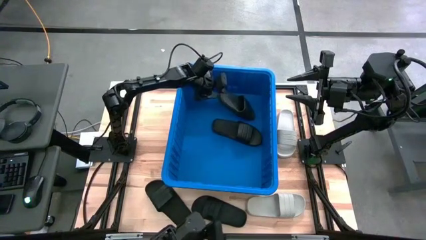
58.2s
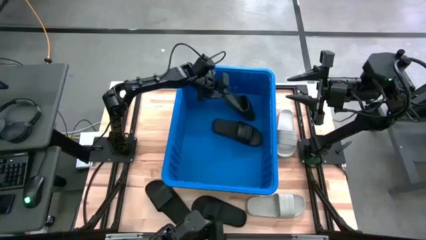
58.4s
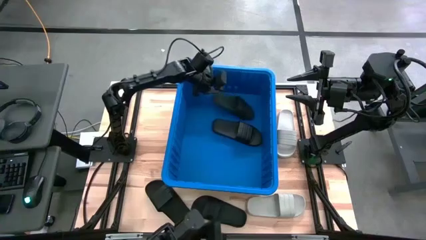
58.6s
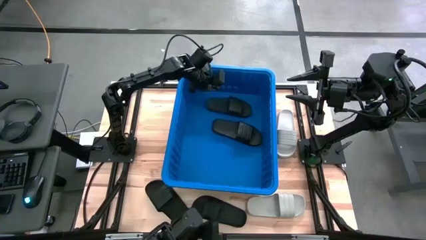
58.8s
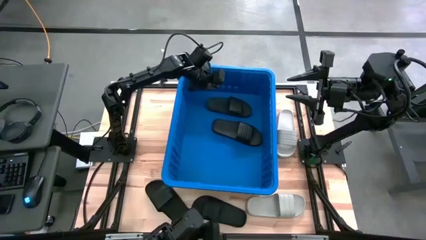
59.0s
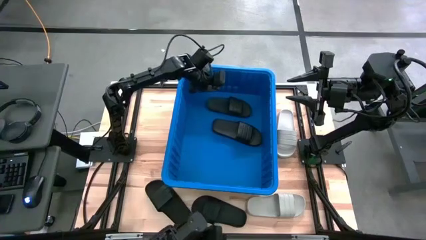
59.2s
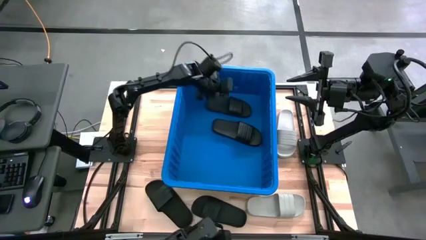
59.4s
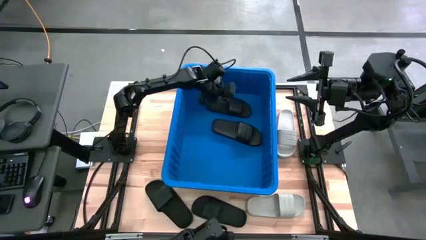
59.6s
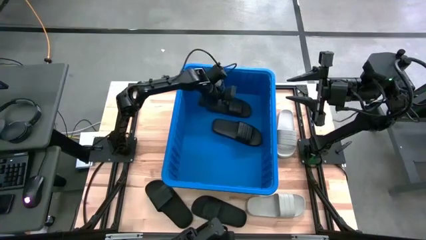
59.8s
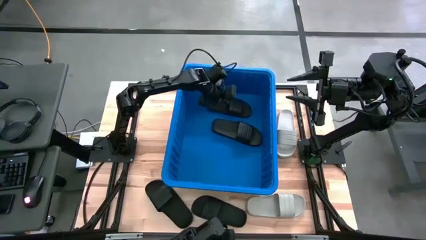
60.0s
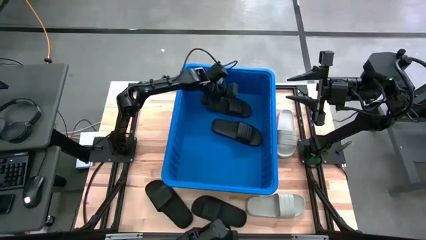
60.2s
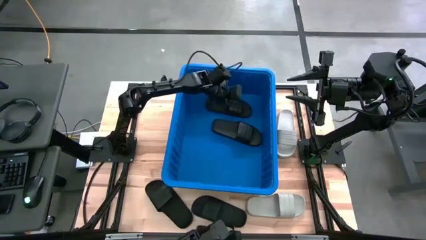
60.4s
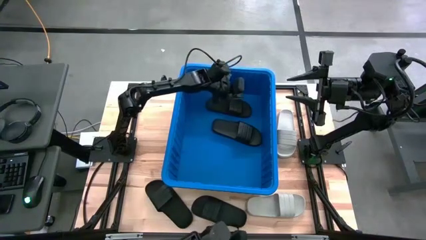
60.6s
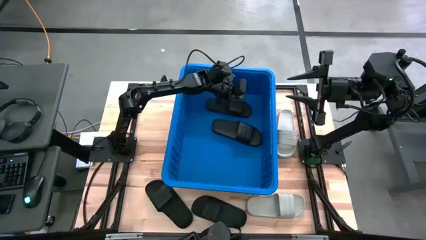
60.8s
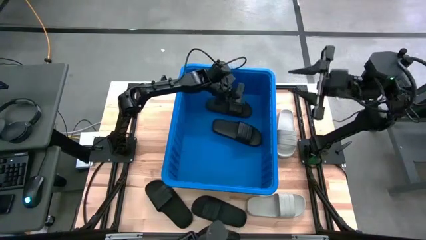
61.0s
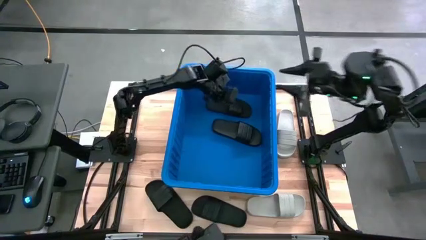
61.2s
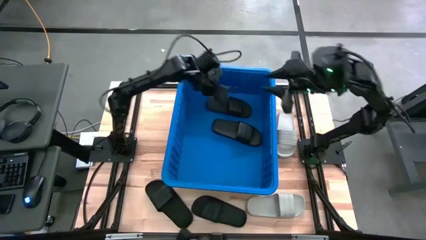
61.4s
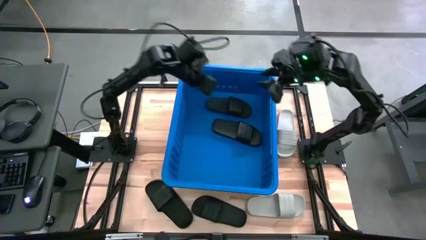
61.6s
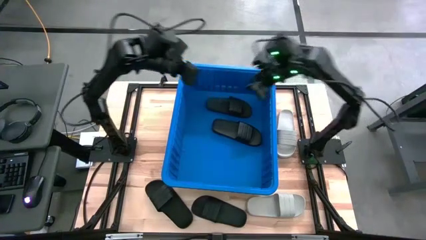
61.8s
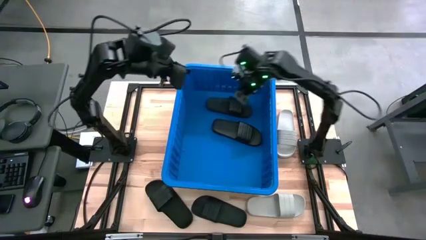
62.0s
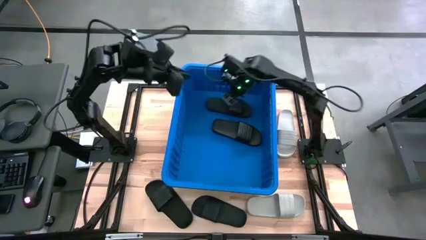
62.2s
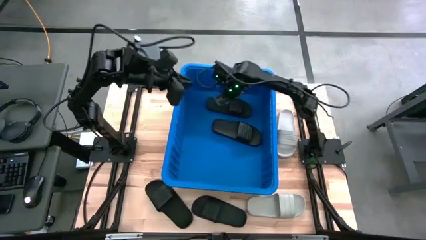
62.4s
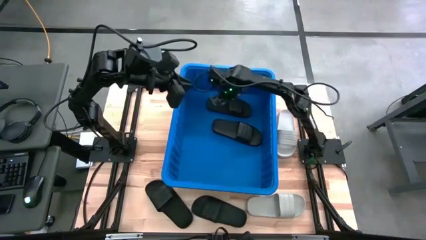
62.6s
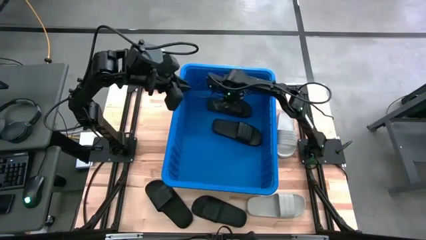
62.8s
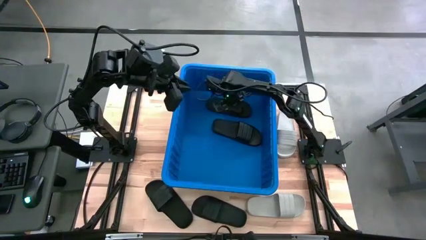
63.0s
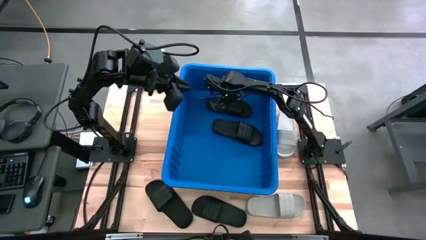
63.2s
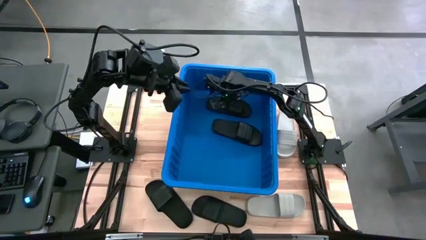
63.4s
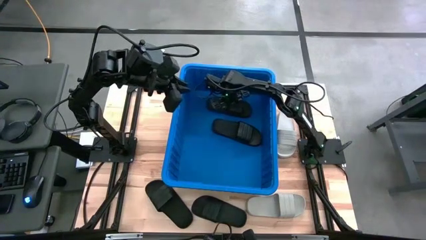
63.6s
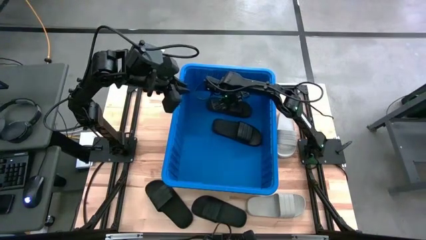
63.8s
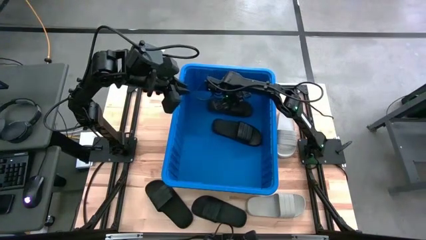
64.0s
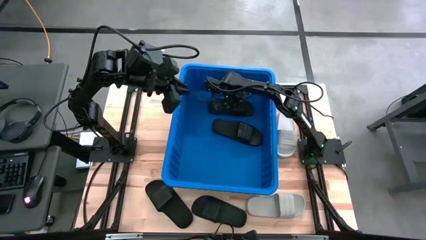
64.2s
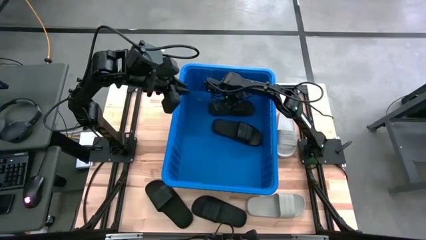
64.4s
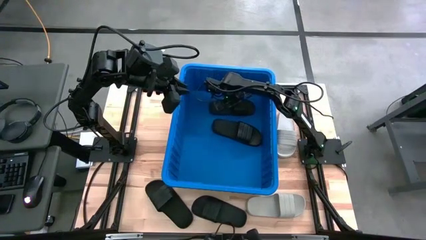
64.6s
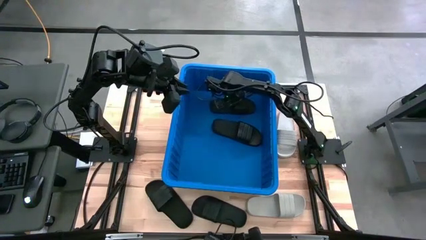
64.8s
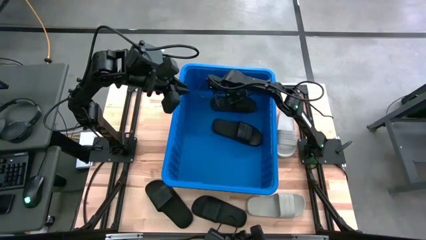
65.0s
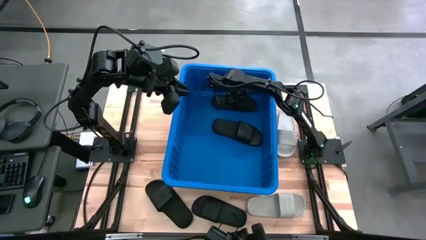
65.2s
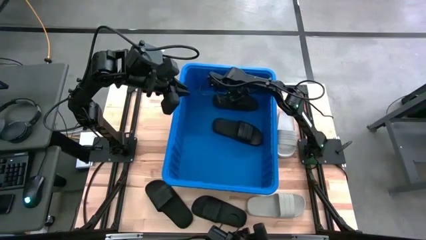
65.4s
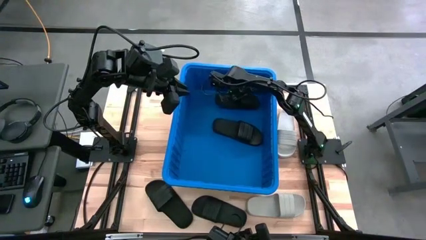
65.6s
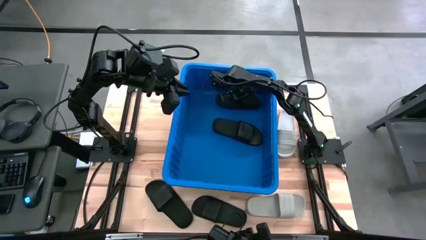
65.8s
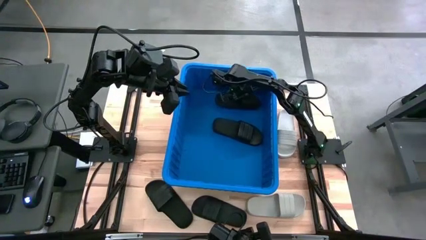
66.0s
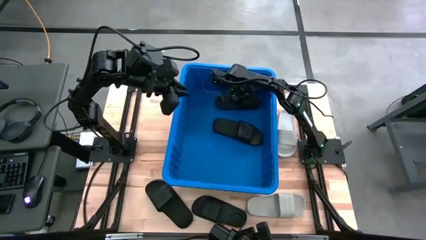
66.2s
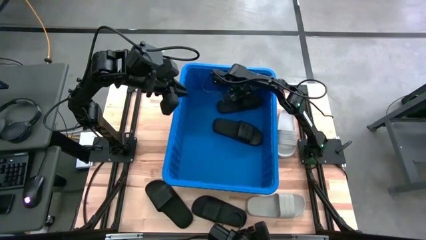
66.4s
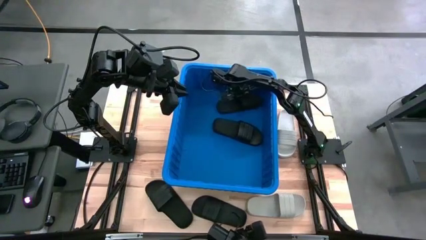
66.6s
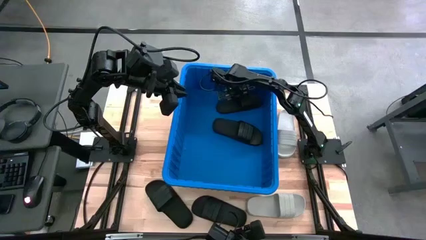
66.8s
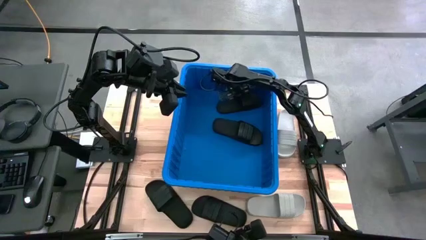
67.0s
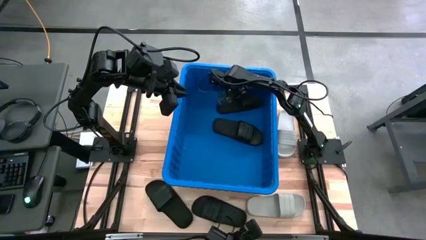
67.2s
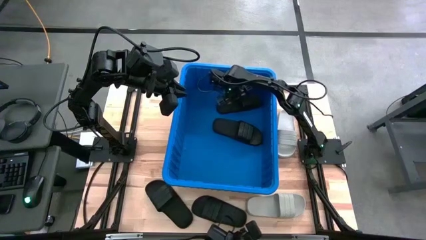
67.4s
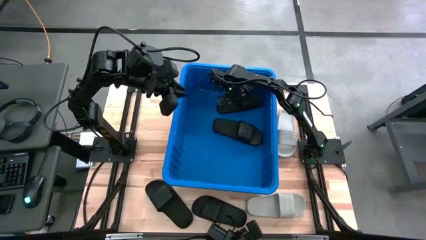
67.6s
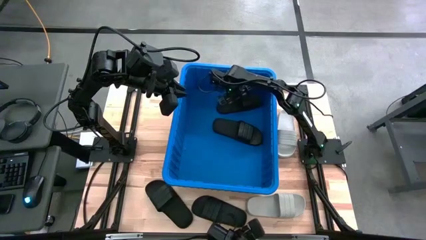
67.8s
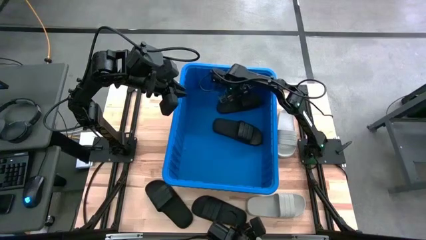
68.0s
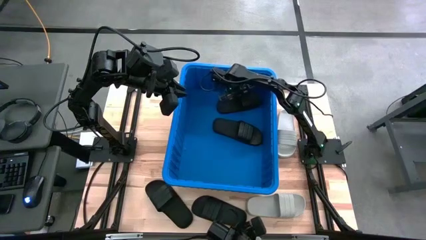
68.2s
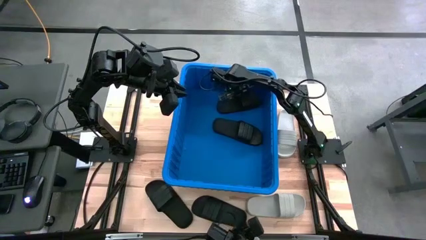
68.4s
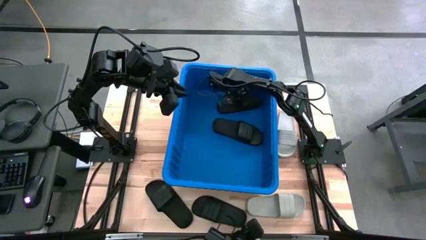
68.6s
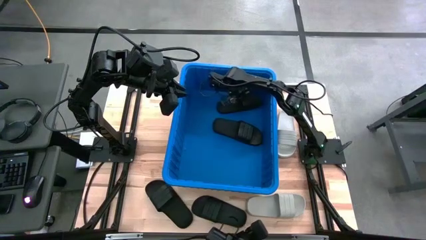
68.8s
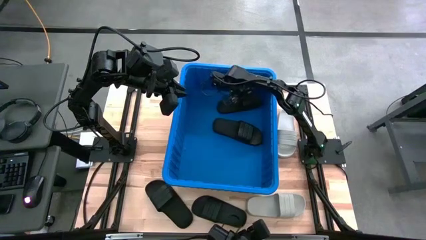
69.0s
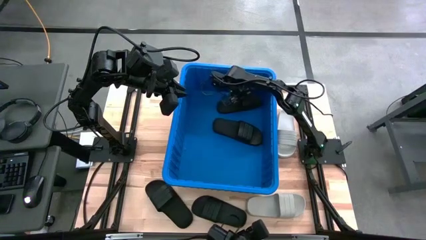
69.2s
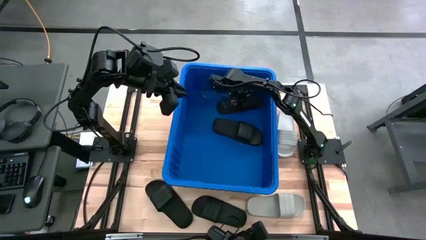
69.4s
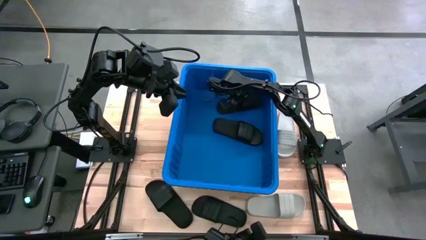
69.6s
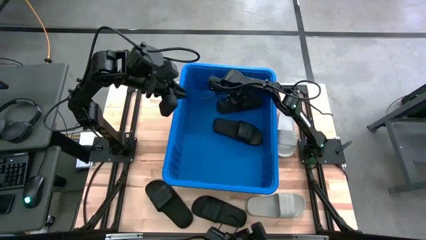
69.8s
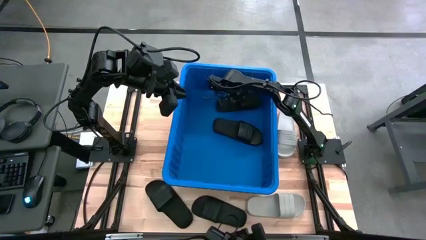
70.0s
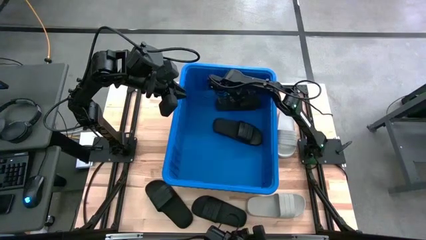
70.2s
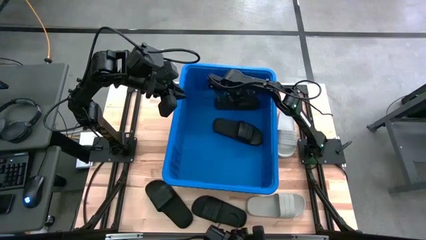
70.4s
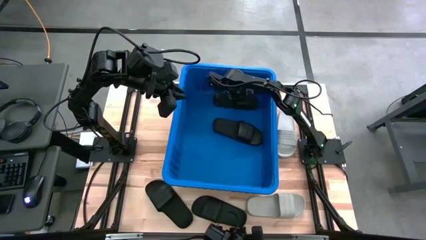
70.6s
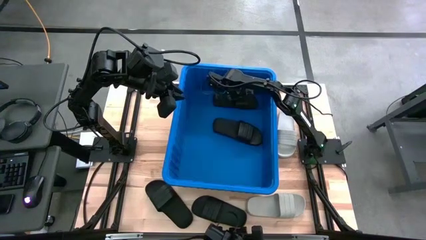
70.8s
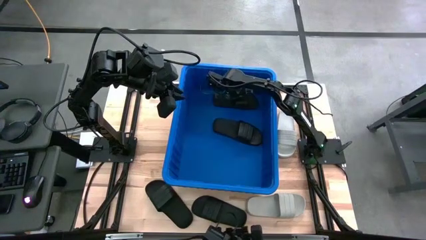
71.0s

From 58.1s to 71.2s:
Task: Pick and place slides into bin
Put the black slipper into the blue bin

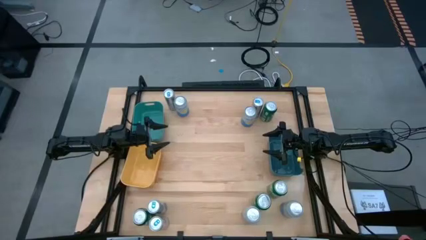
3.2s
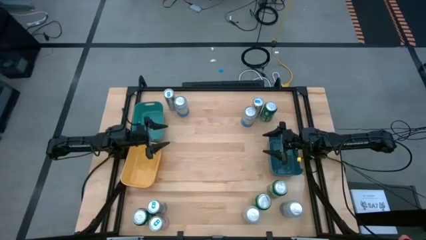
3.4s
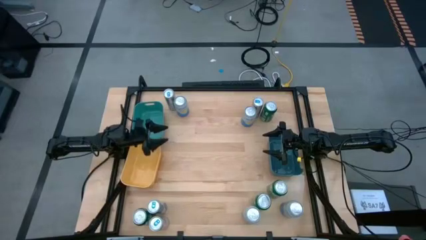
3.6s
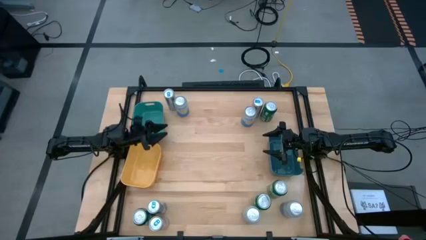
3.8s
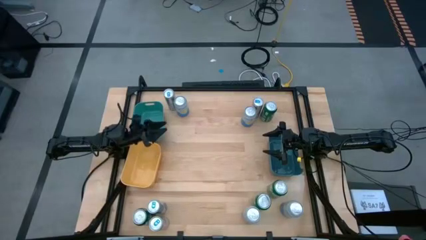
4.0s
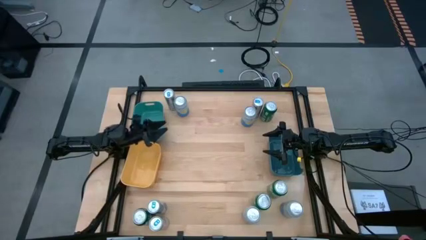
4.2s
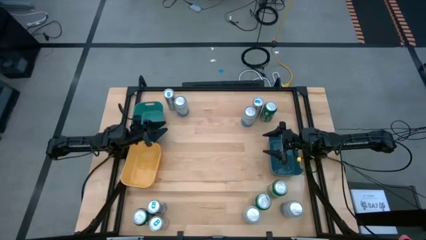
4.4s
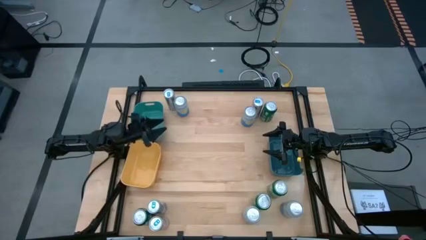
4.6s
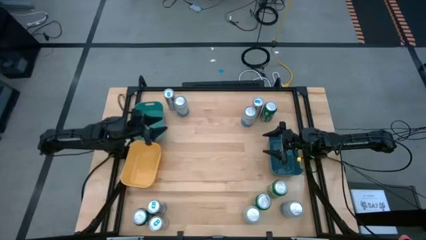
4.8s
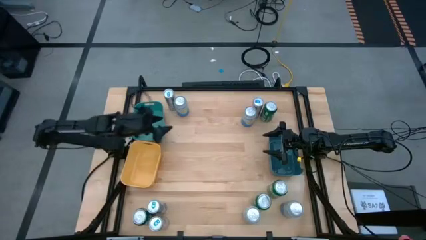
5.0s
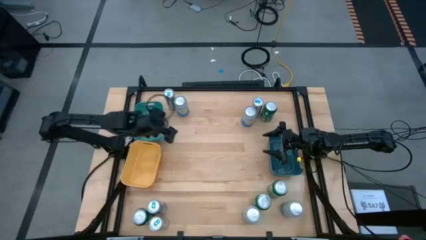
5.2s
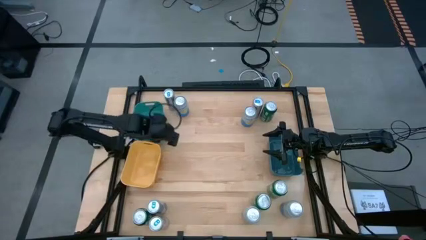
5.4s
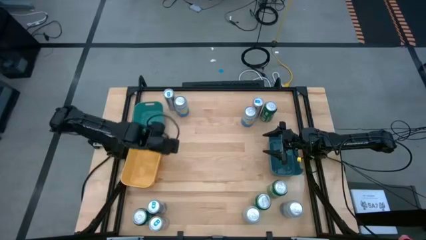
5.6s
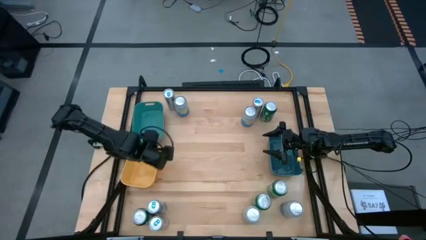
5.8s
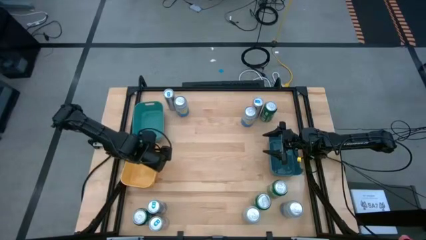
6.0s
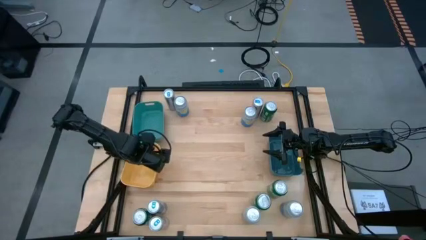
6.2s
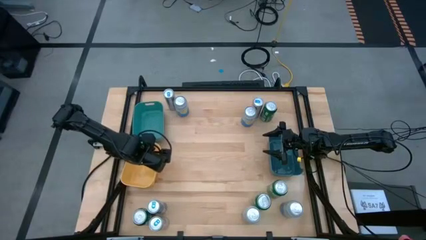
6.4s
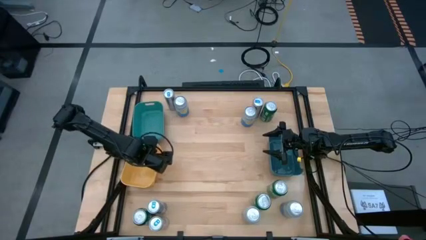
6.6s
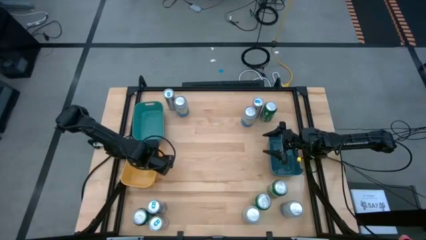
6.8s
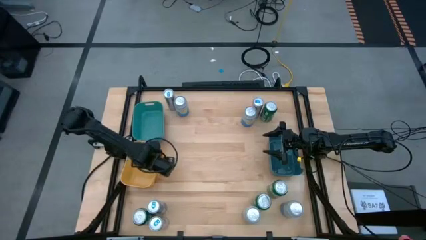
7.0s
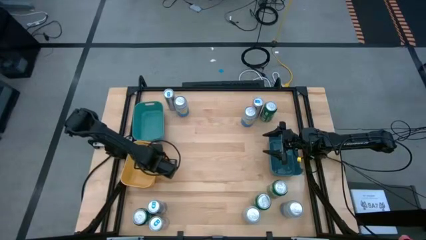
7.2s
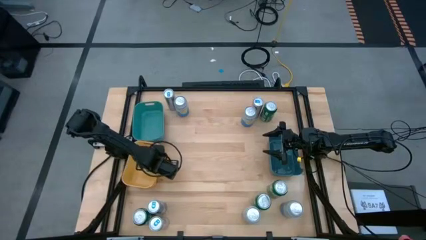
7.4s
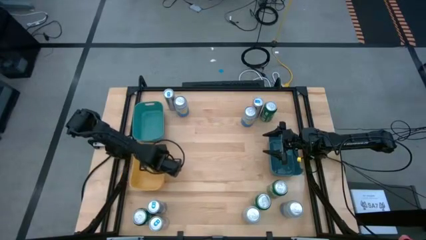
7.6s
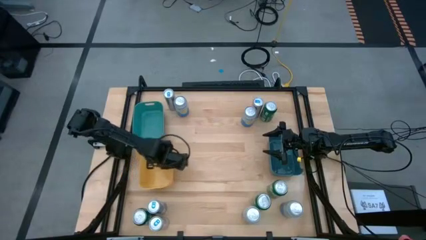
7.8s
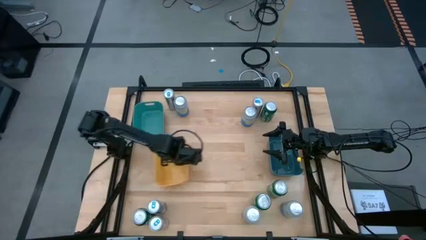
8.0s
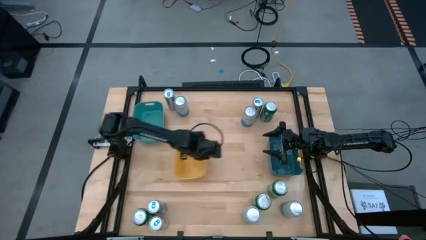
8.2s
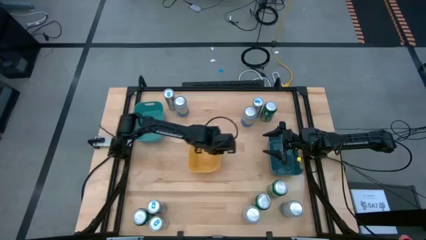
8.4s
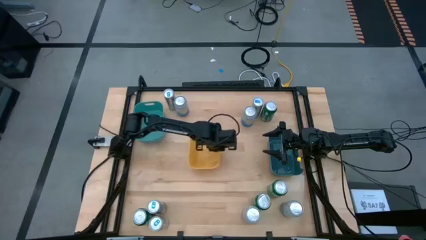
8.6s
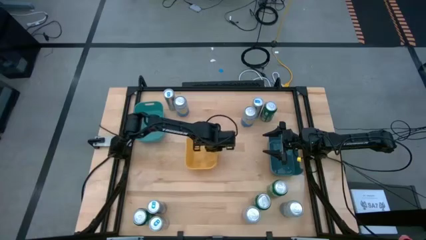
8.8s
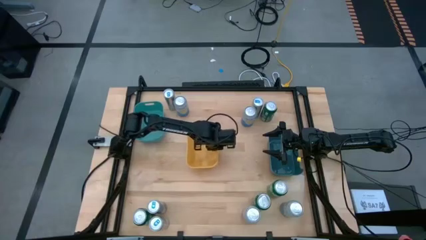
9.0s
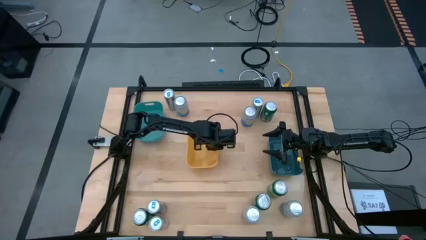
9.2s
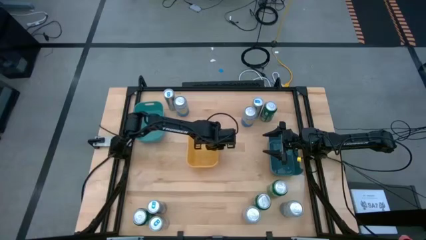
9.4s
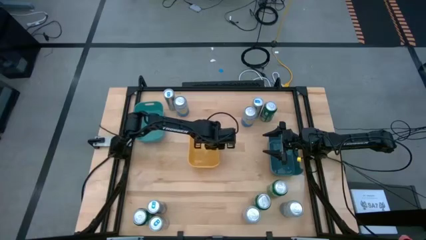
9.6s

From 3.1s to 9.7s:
Task: Sort soda cans
Move the yellow bin to the center of the table
